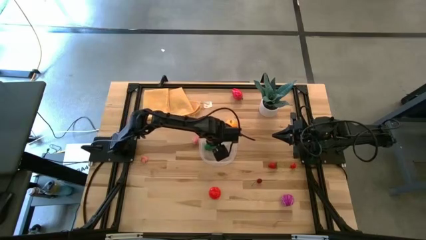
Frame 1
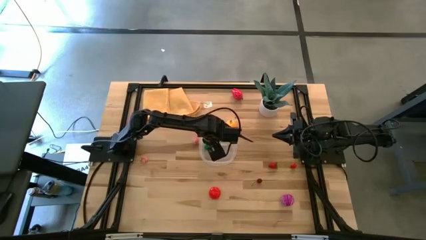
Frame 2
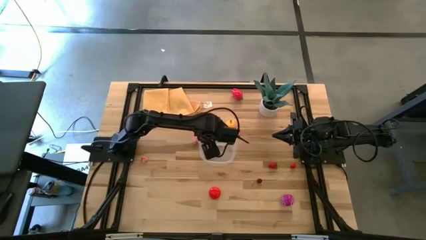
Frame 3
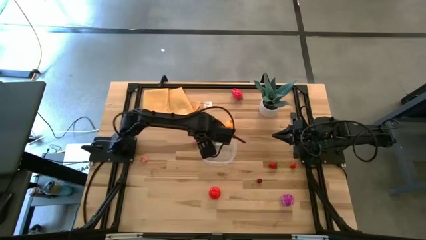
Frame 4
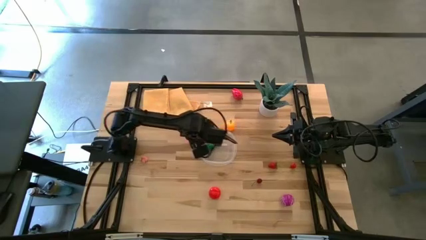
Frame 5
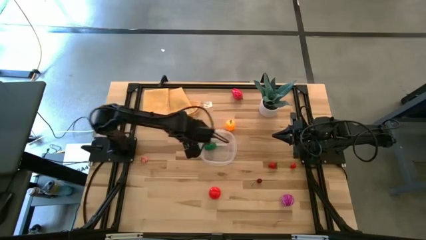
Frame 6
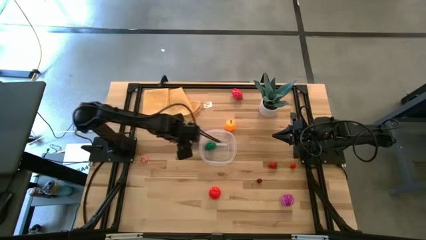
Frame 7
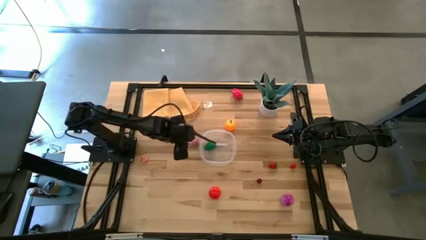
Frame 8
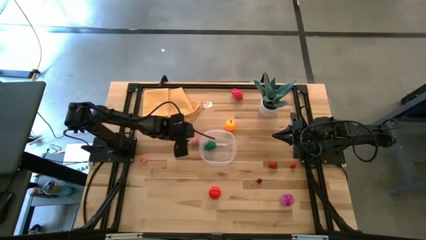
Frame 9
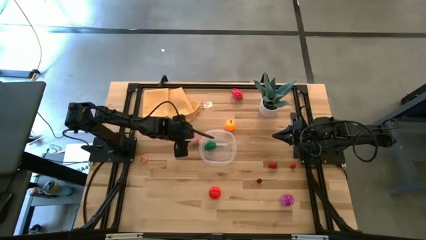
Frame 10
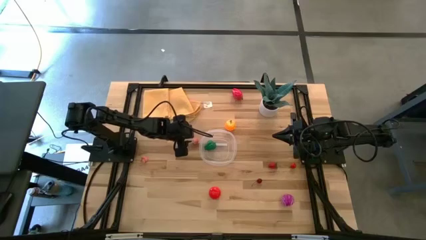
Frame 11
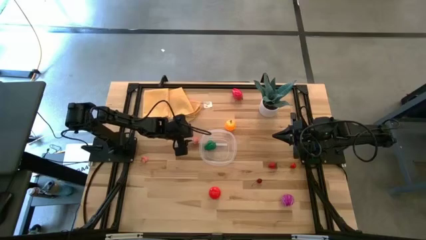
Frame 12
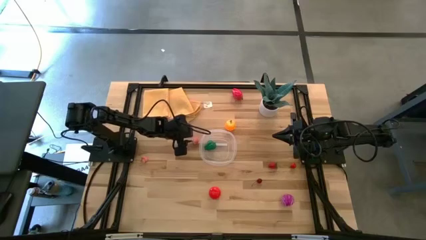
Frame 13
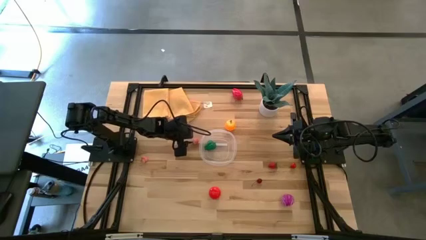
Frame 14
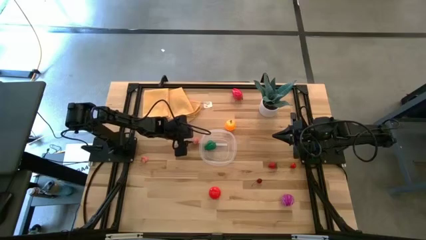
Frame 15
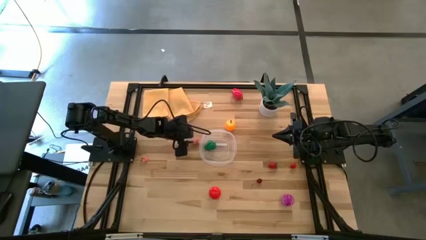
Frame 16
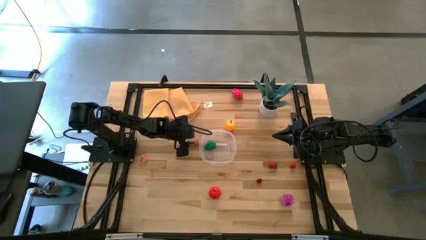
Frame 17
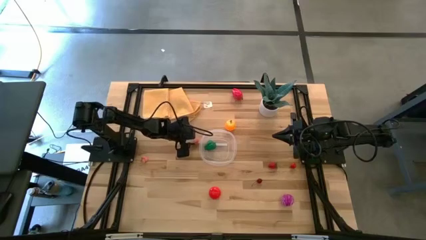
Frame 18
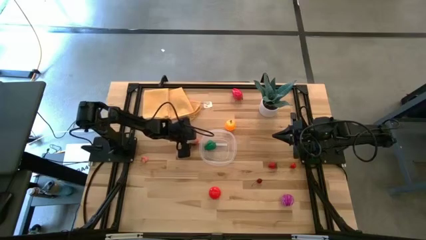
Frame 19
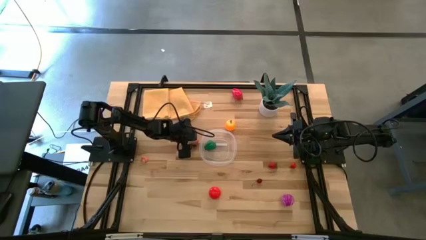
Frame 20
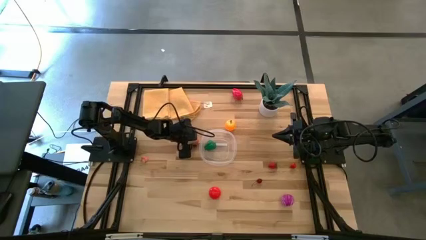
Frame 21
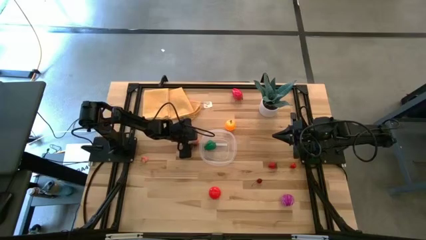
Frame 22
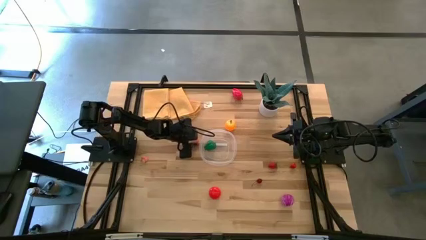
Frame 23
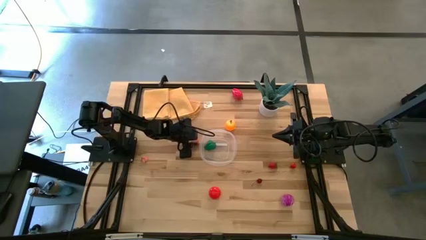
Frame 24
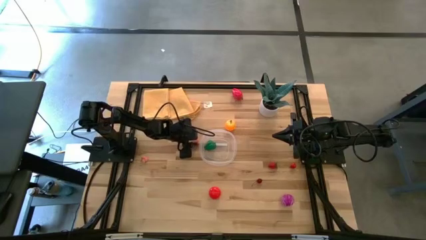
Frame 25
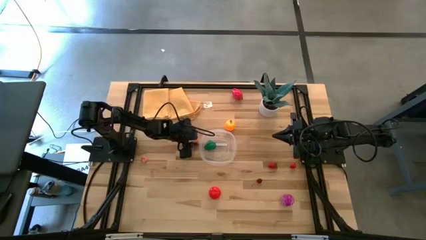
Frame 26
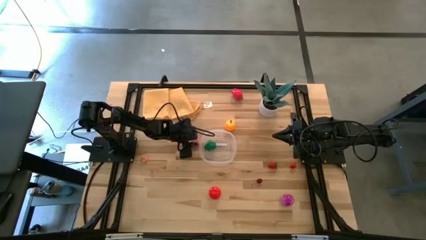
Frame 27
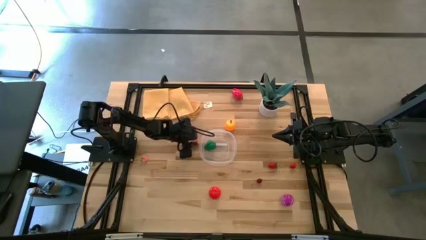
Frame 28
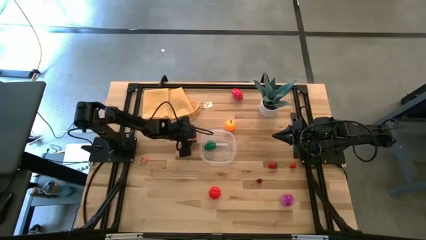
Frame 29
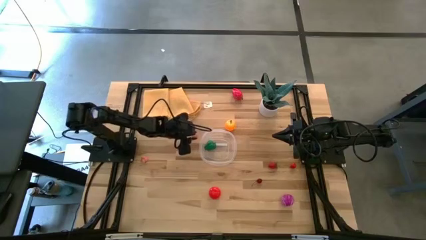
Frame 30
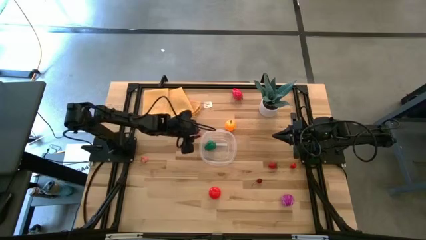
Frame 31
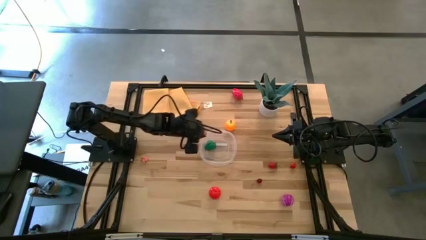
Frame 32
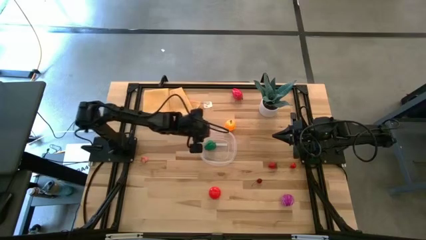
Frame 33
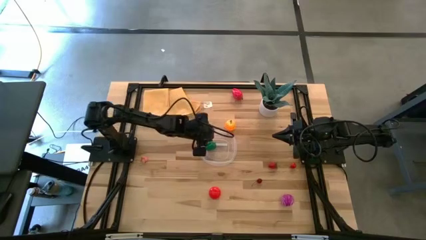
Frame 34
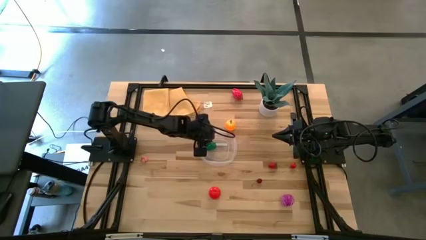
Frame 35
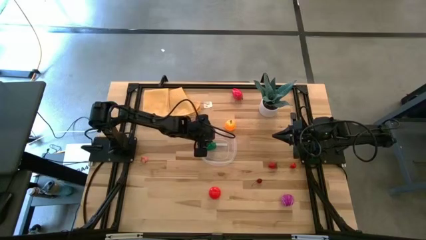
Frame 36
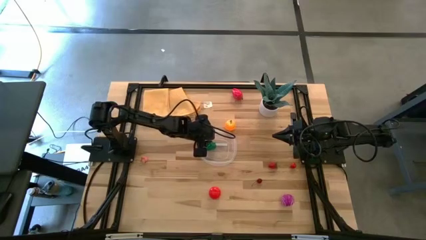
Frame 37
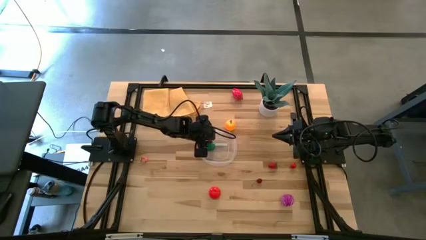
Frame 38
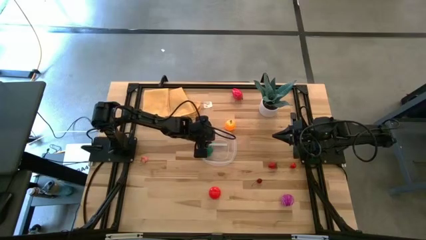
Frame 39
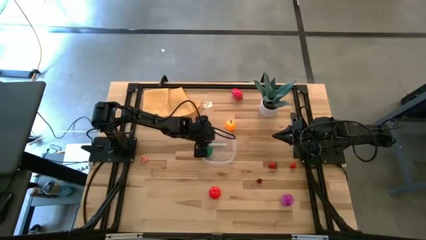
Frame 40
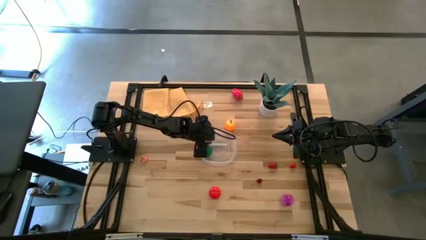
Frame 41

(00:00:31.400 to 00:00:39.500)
Task: Pick and placing Produce into tupperware
Put the right pink peach into the transparent bin

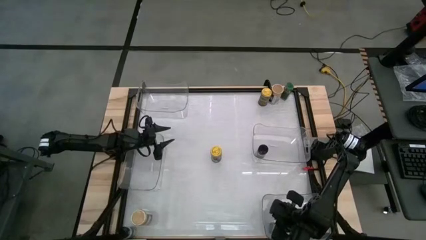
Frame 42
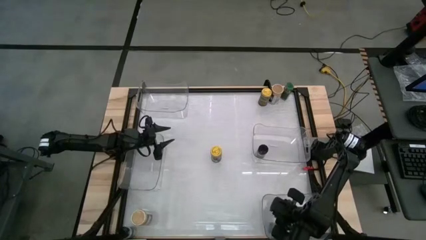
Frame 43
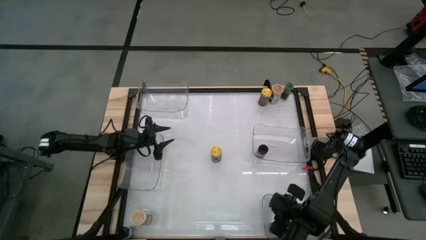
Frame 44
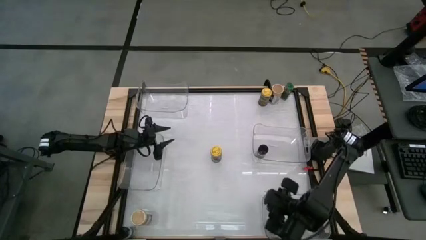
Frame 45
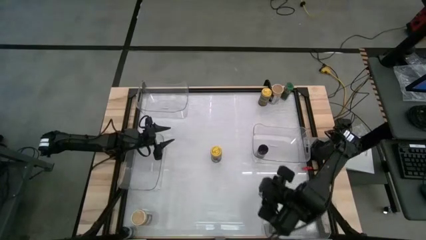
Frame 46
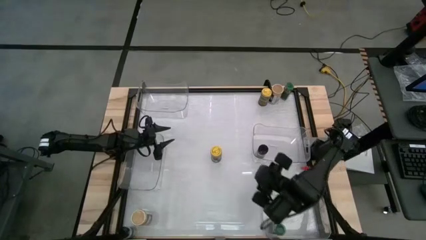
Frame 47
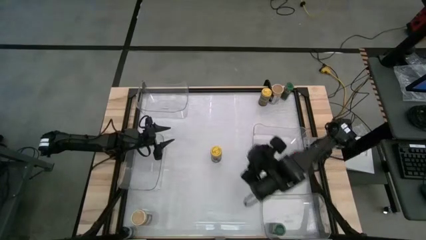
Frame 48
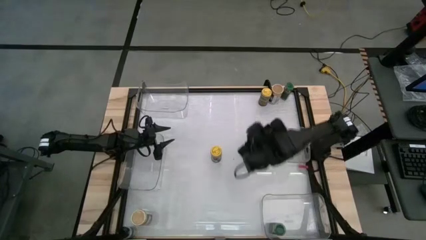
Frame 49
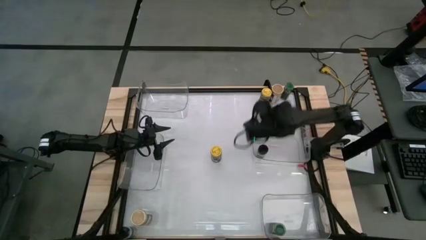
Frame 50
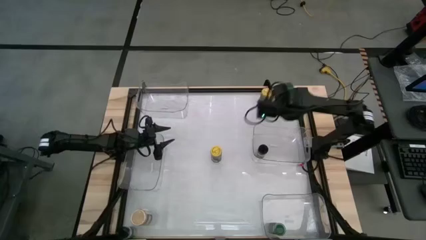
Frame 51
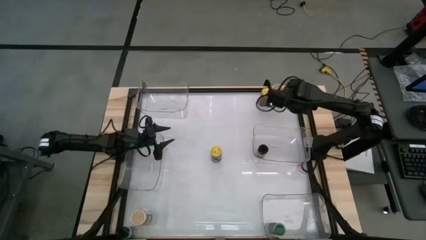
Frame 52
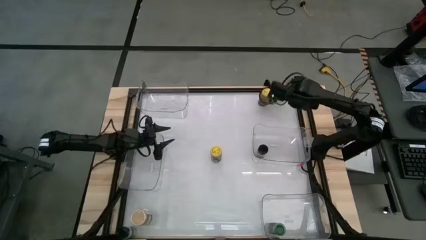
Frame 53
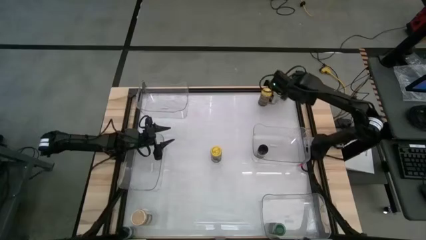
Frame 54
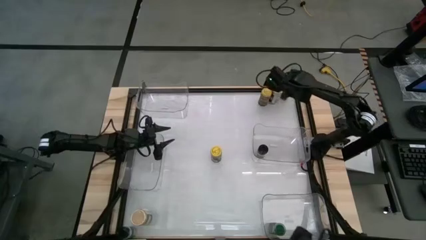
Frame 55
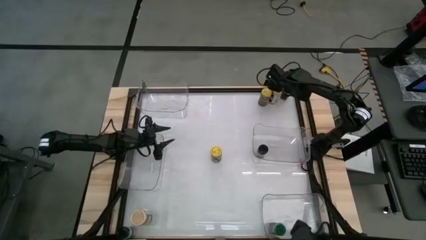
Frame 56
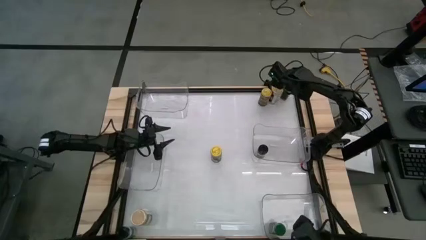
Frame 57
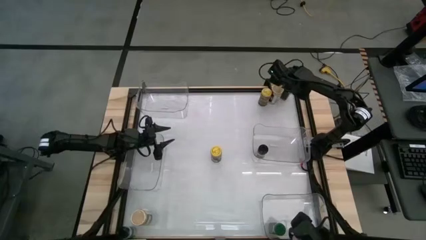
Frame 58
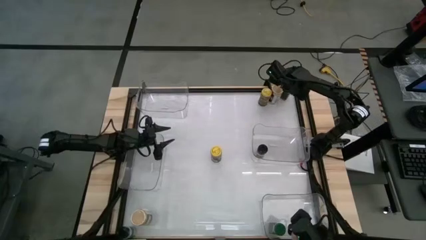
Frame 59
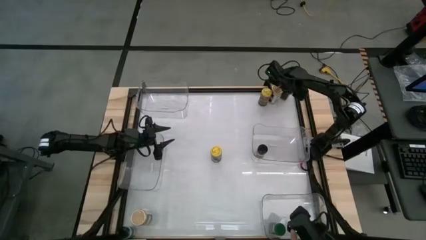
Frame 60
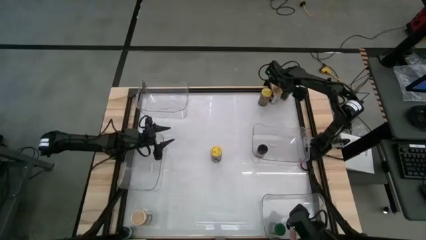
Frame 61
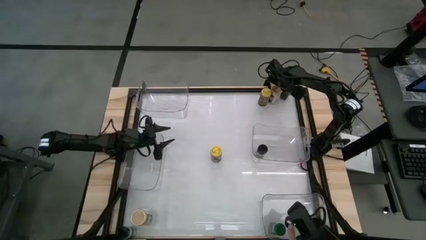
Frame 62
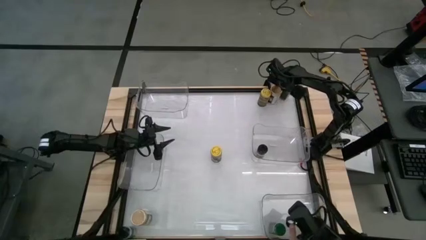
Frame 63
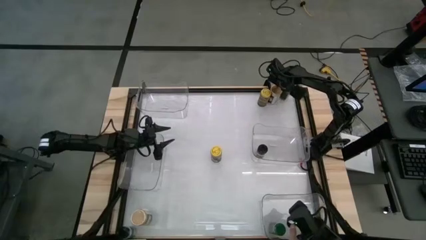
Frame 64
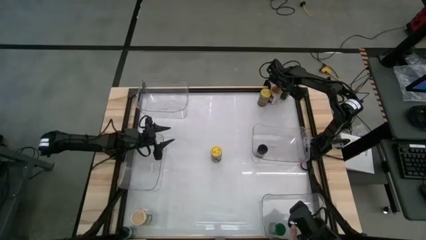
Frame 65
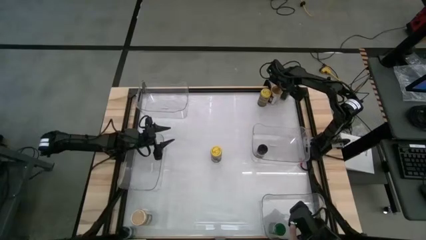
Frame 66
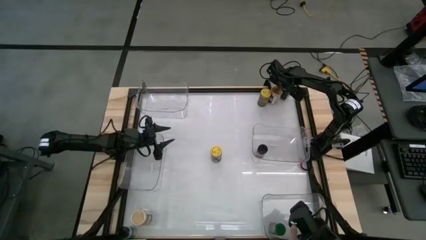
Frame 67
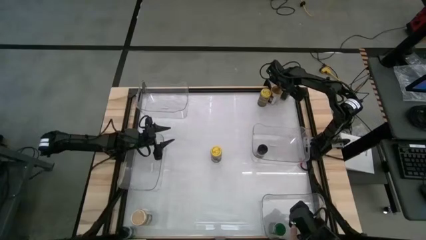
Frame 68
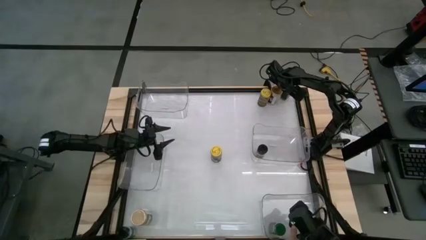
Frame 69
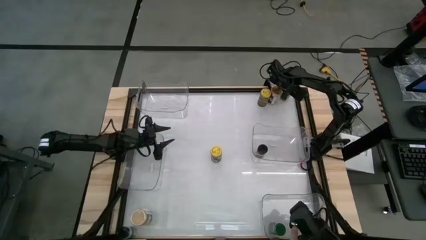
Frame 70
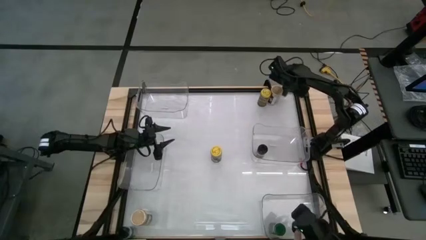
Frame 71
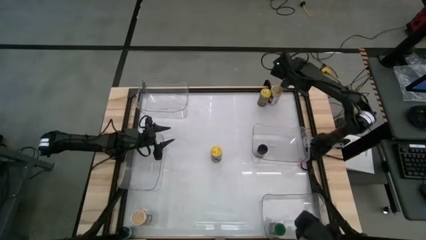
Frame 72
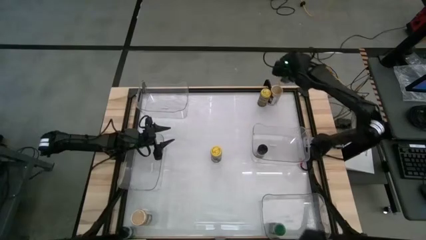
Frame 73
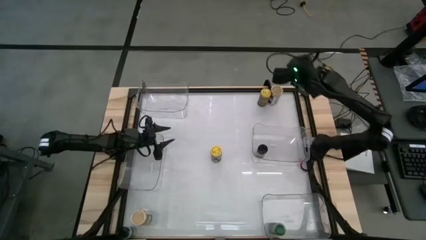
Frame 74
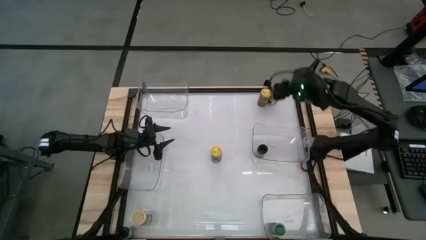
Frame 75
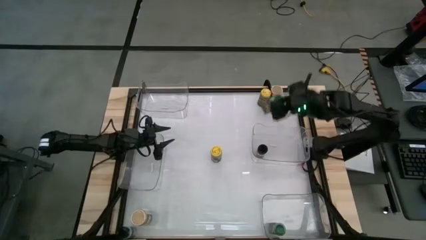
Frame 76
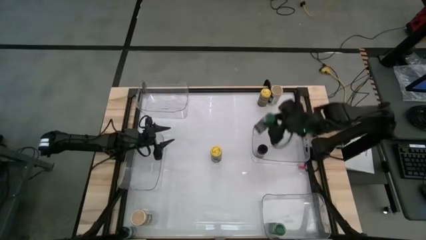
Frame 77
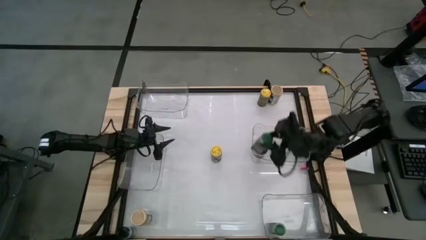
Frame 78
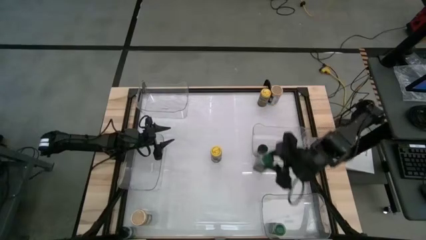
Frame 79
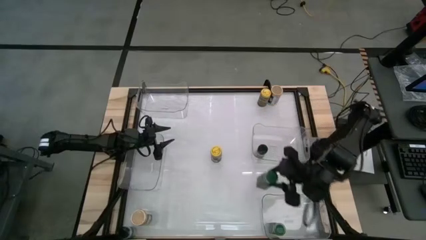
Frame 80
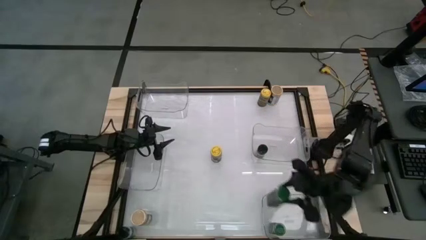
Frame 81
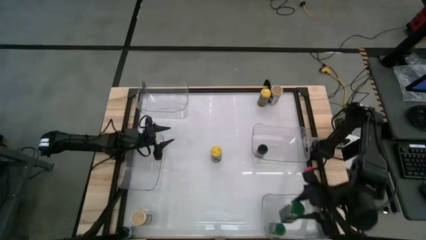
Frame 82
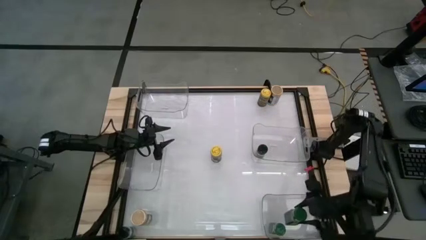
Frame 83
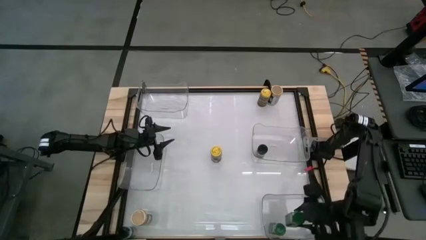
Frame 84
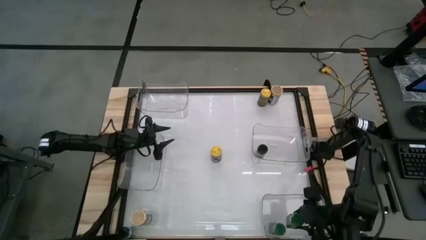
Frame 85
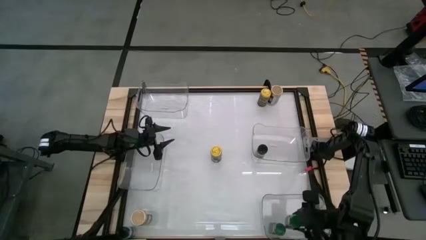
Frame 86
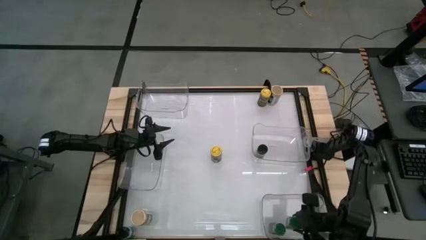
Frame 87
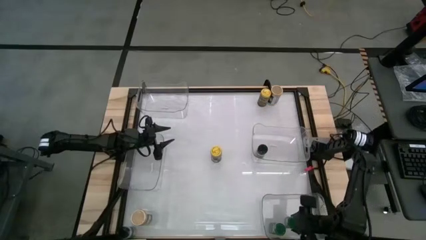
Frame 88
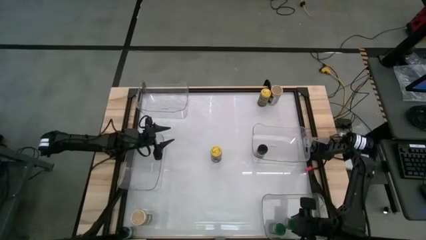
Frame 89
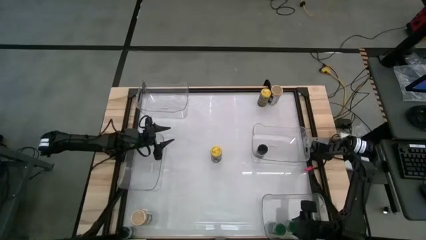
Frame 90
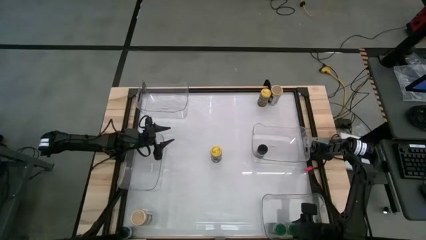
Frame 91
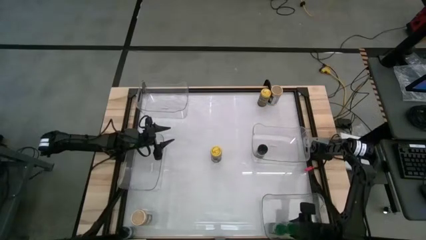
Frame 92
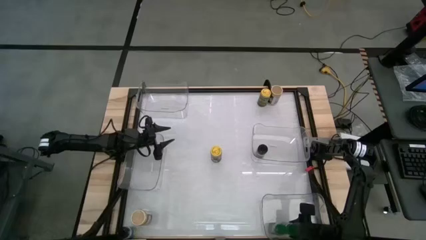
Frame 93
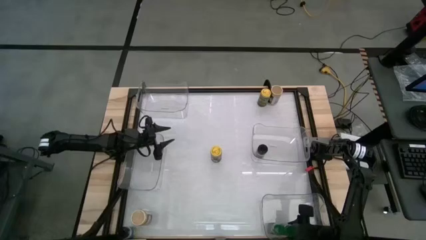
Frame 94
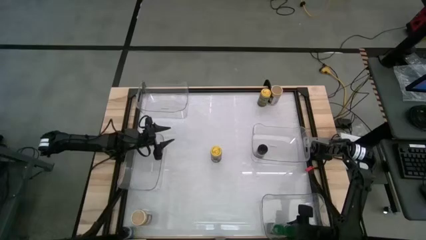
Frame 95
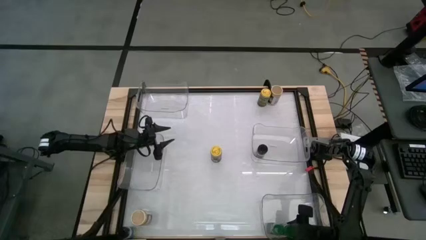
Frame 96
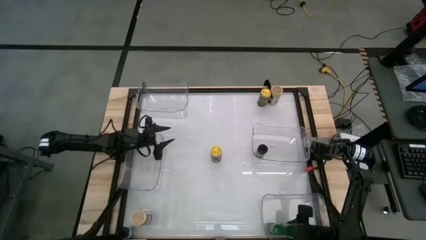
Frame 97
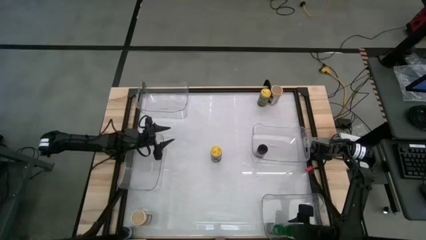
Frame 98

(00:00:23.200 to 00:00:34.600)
Task: Sort spices by type
Put the green seasoning bottle into the bottom transparent bin
